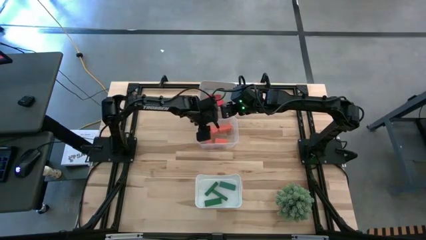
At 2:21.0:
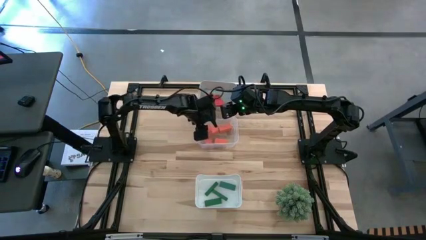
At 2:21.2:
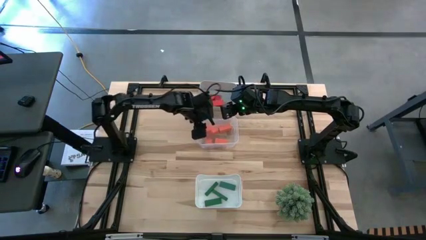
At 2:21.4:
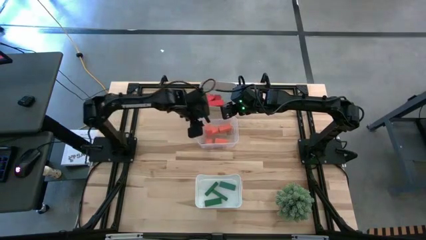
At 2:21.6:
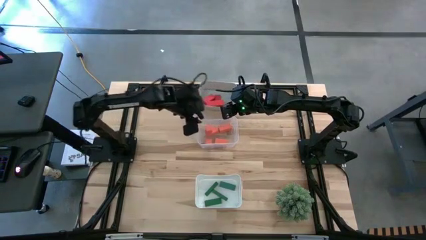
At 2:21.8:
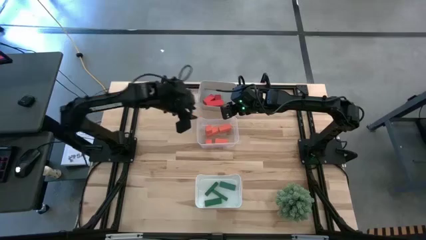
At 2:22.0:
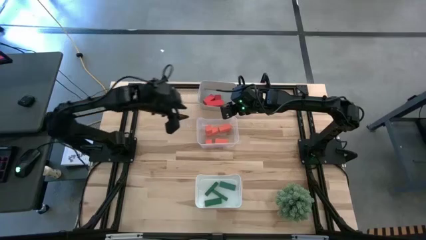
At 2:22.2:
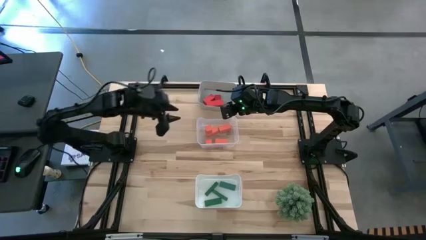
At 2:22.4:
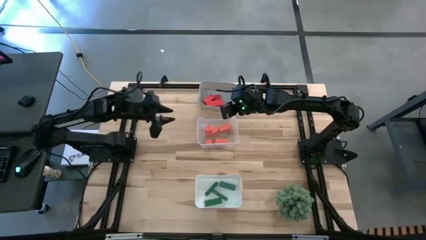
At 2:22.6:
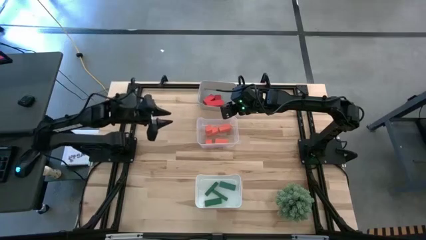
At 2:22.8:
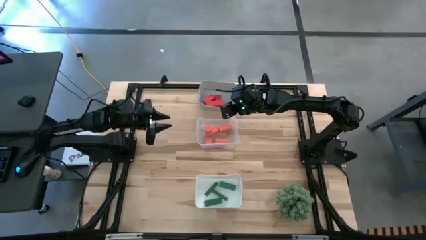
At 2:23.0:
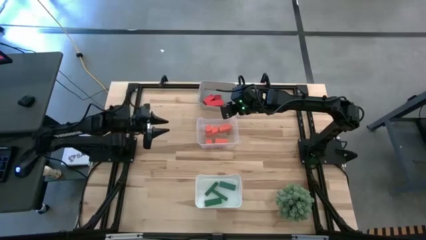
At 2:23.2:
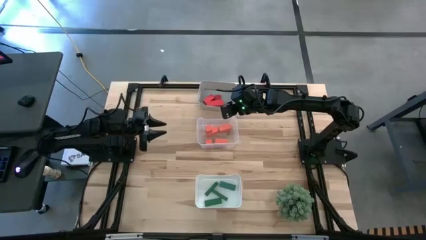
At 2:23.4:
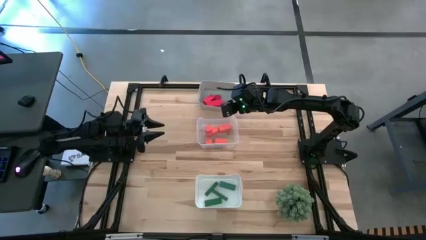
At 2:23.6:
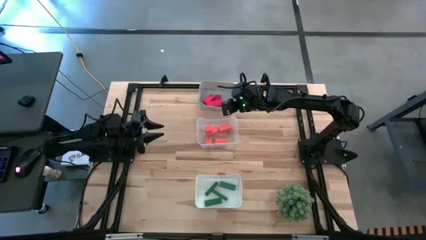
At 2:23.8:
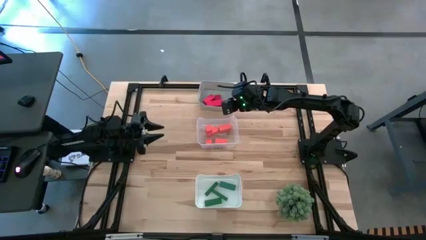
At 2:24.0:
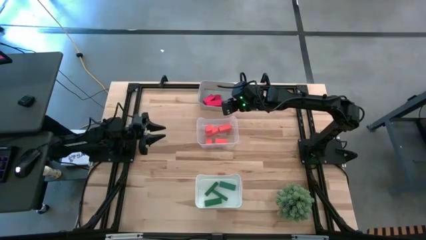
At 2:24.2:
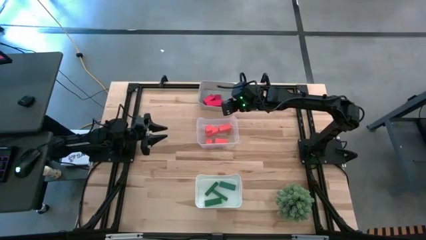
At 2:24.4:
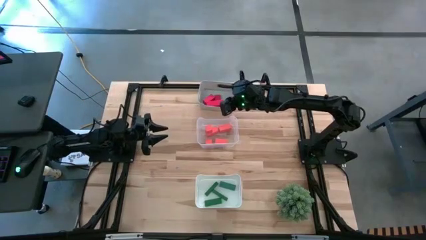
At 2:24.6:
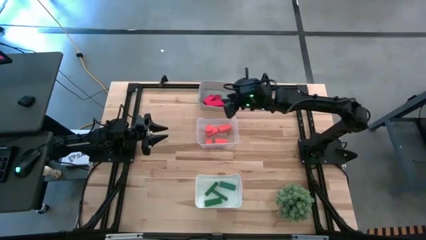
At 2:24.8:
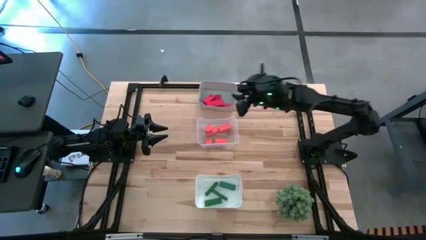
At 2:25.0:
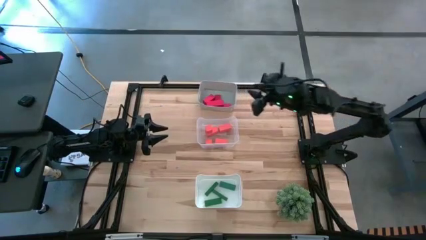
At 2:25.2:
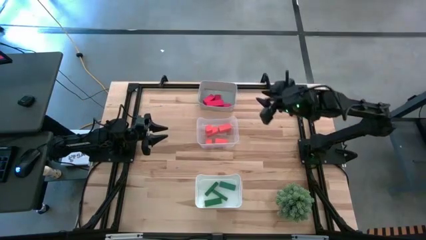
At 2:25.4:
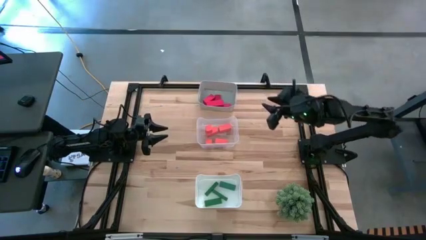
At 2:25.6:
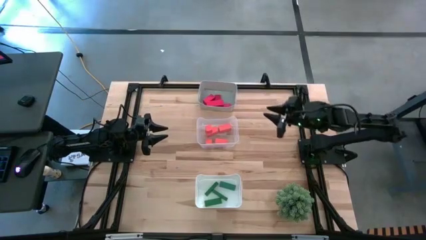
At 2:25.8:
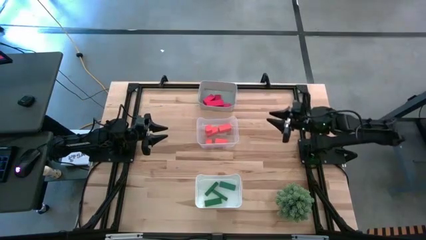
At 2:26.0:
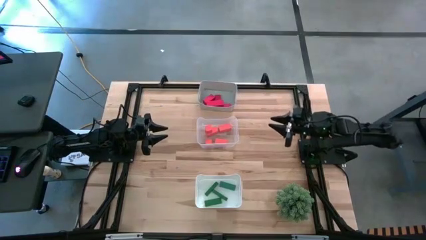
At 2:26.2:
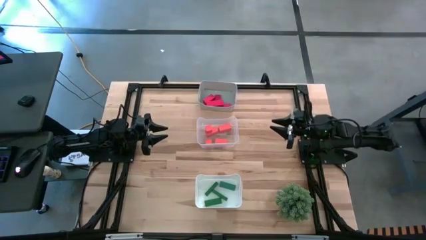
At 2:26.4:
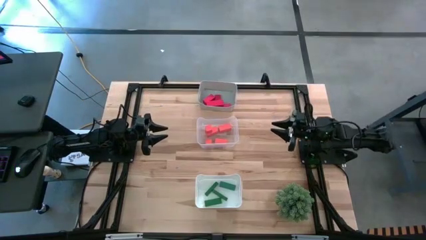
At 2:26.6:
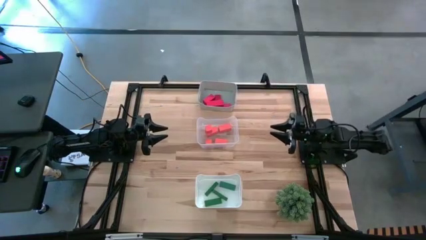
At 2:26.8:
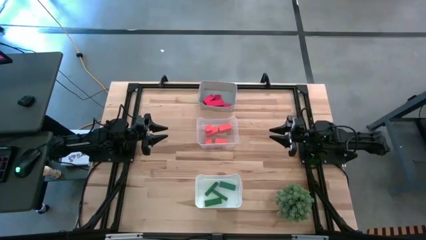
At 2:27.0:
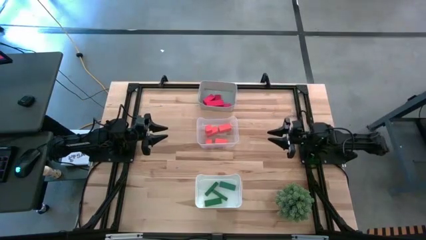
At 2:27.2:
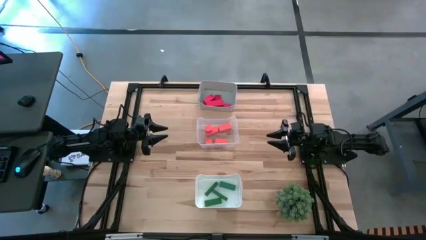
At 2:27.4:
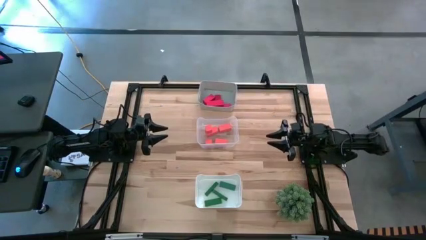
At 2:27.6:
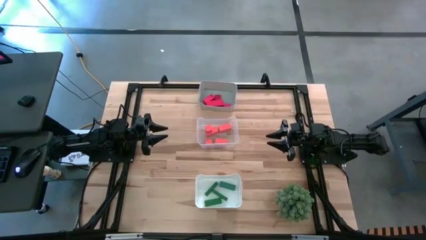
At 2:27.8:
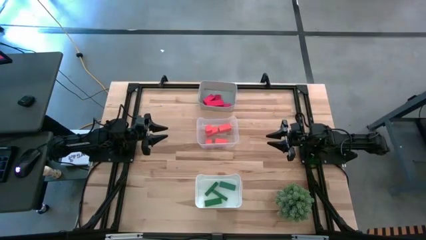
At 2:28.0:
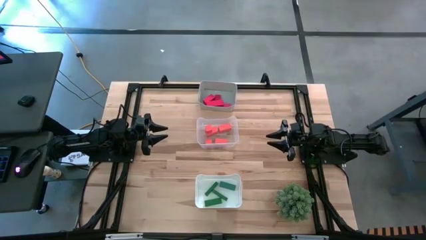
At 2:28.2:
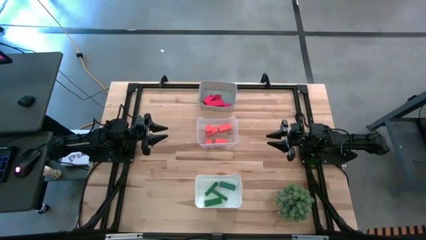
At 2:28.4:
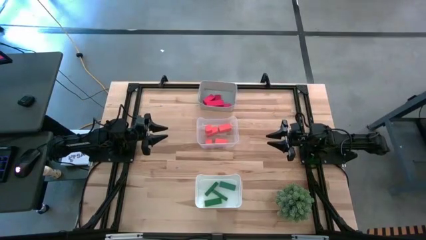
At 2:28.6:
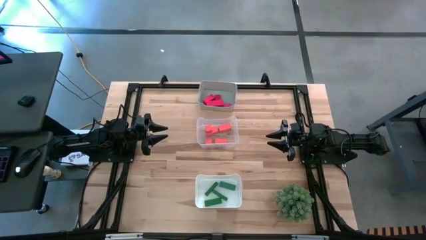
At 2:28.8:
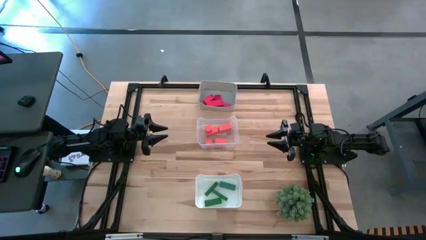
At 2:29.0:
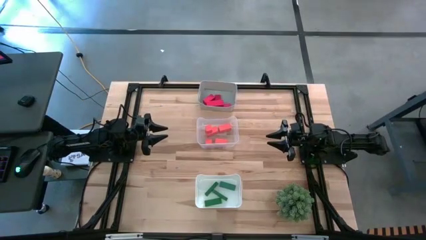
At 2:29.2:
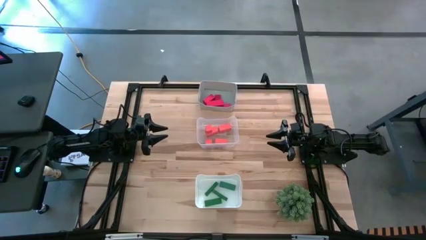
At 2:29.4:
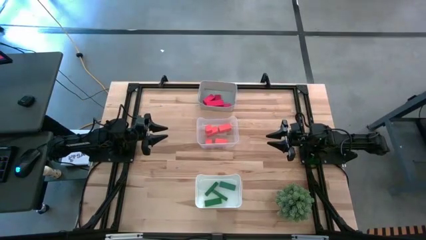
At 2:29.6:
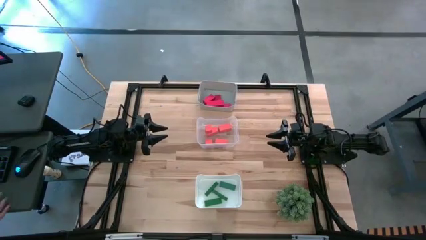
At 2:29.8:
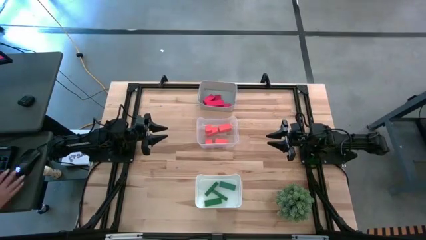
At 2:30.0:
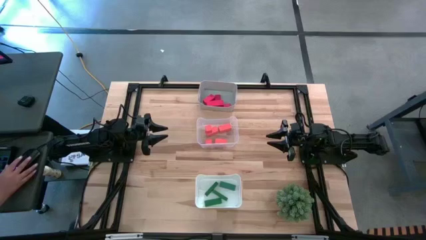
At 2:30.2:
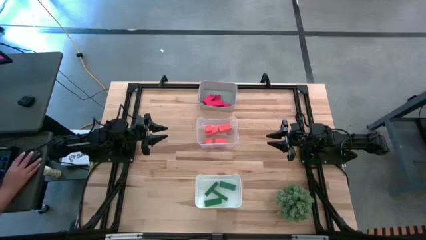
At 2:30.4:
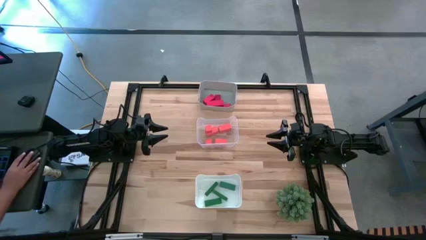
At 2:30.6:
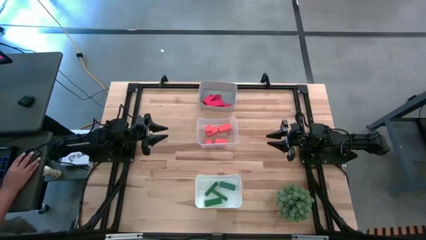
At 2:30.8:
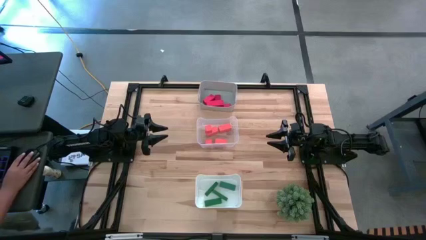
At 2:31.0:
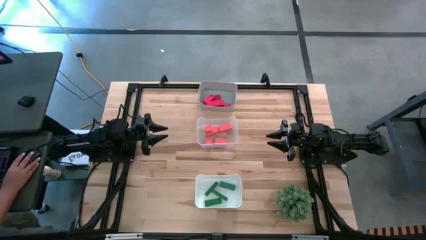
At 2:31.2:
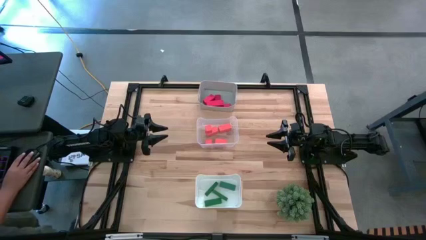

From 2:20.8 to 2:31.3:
Task: Sort & place blocks by color
Return to Home Position
